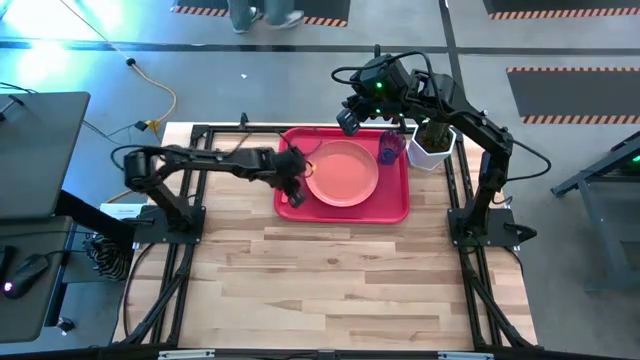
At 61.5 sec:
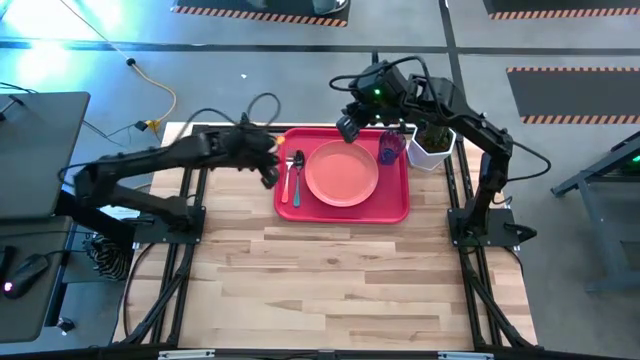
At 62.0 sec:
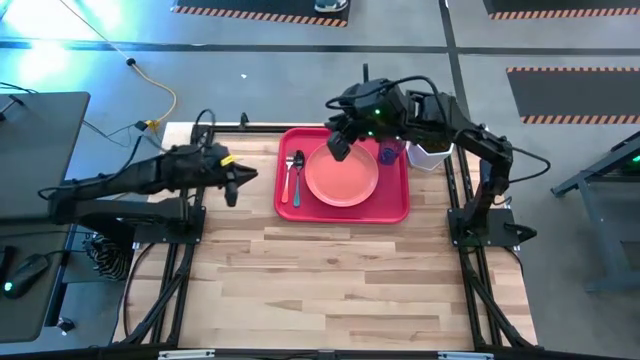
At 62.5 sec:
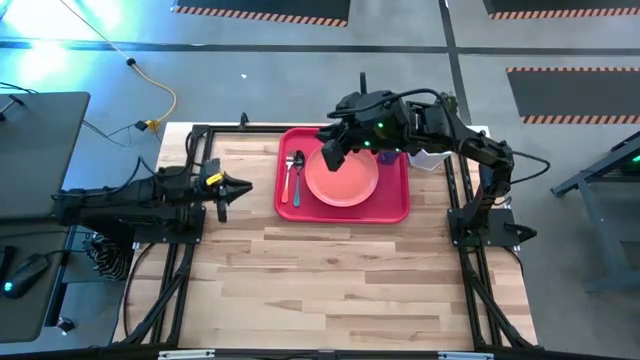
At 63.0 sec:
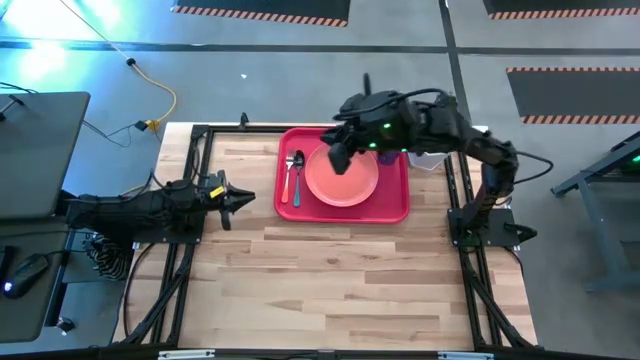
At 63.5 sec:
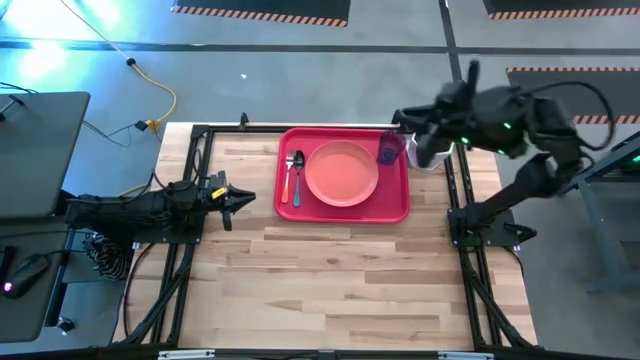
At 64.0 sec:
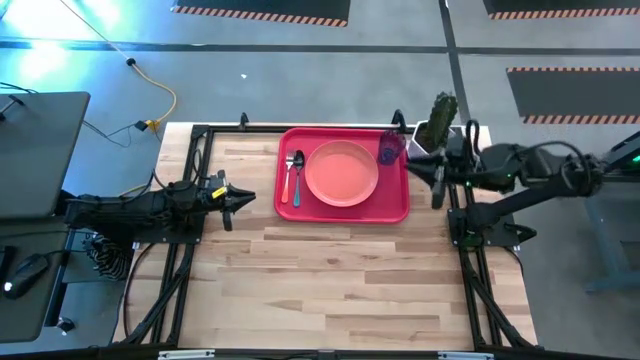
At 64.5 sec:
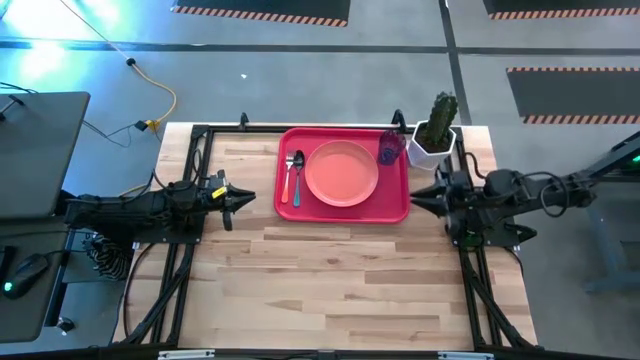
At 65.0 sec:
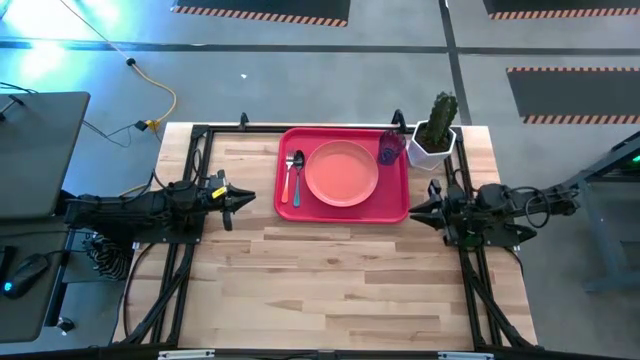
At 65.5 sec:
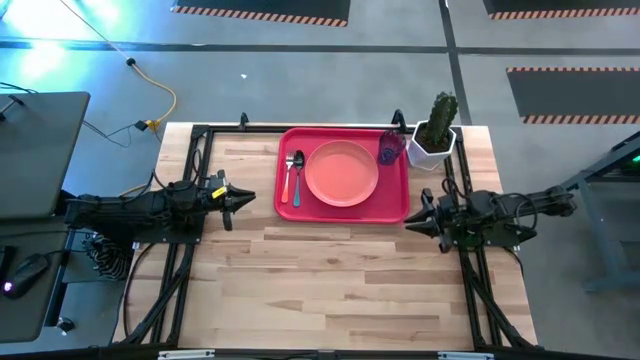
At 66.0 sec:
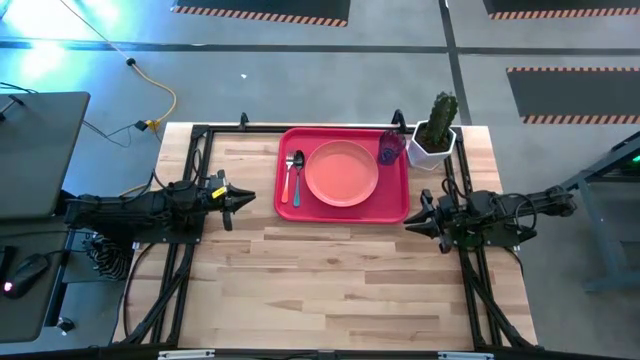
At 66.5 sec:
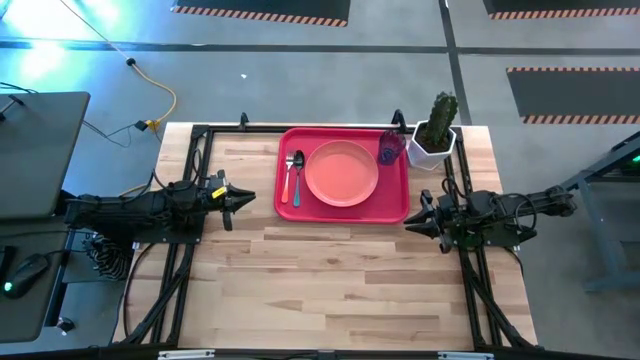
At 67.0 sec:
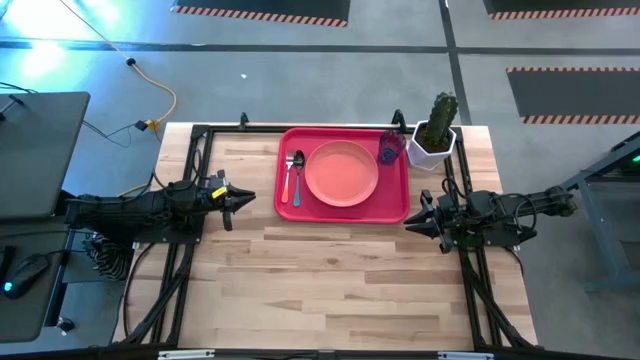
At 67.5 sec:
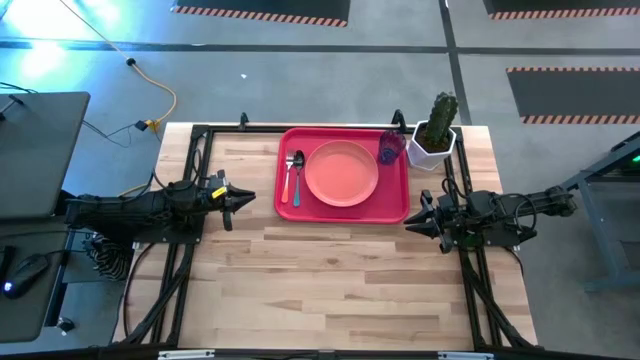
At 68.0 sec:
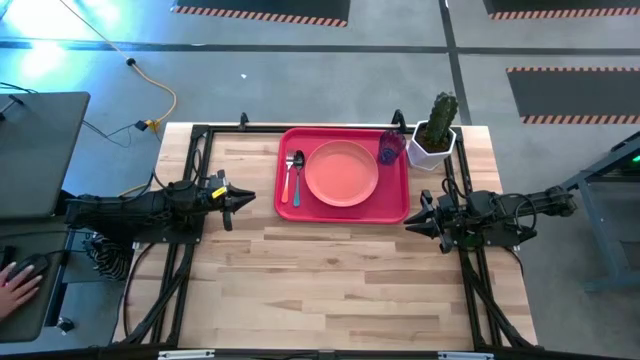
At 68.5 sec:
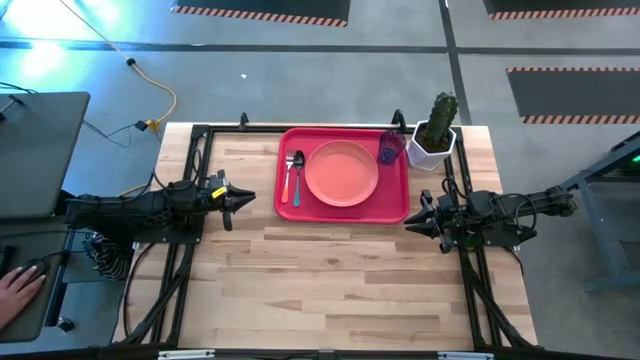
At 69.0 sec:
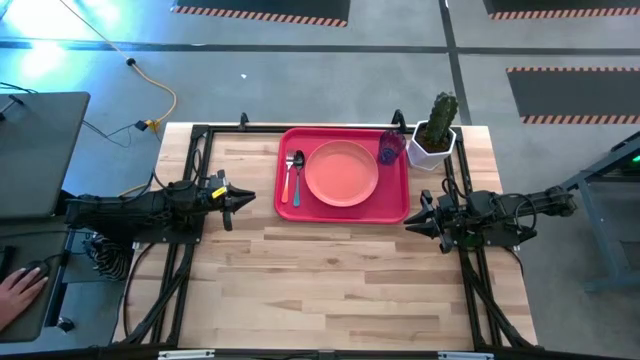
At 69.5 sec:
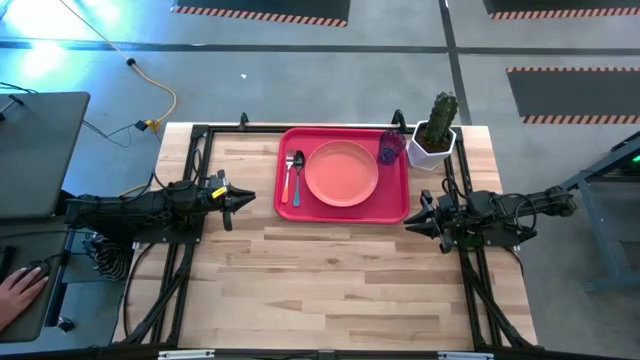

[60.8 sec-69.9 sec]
Task: Pick and place plate/cup/fork/spoon on tray
Return to Home Position

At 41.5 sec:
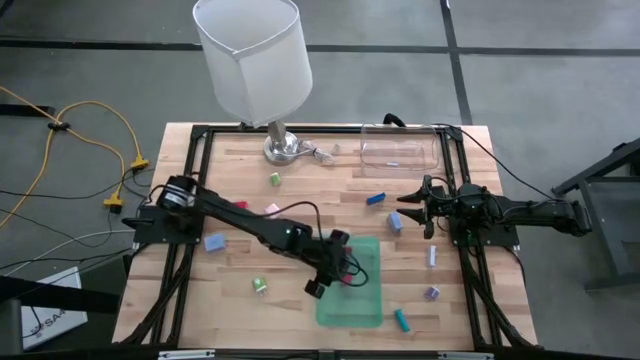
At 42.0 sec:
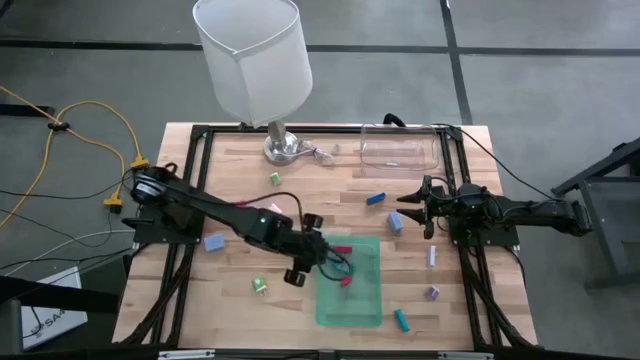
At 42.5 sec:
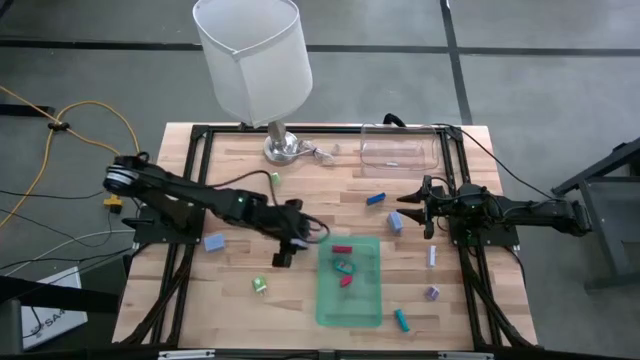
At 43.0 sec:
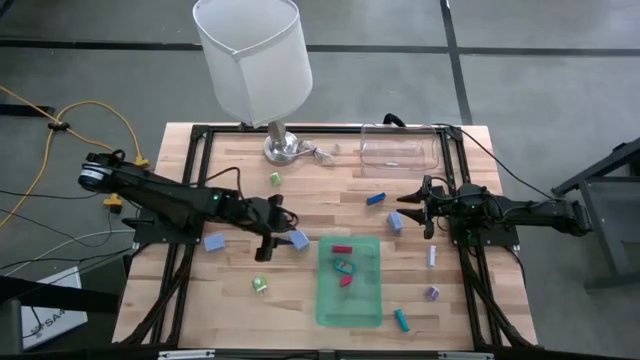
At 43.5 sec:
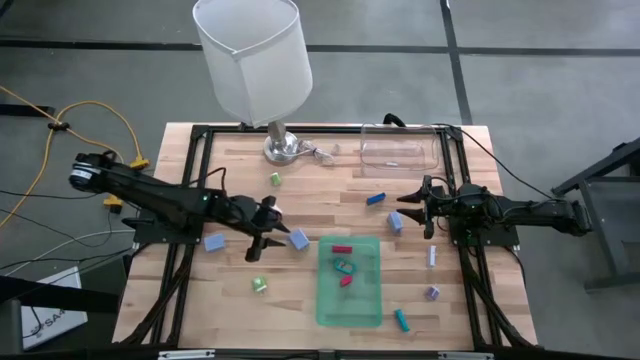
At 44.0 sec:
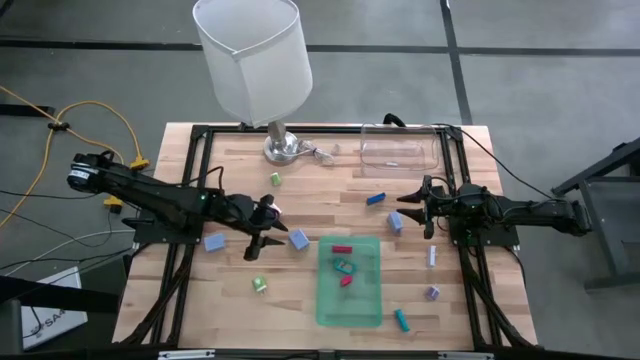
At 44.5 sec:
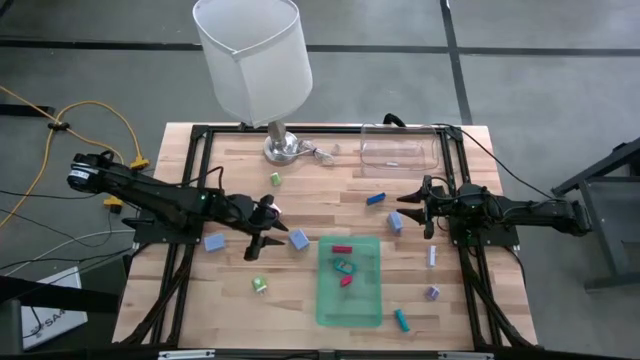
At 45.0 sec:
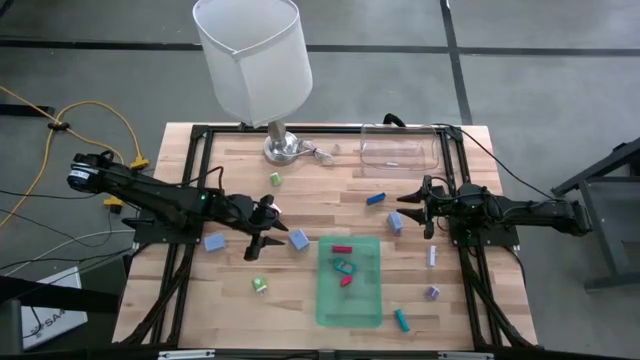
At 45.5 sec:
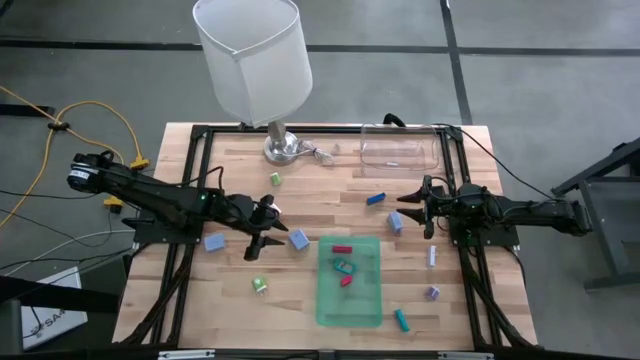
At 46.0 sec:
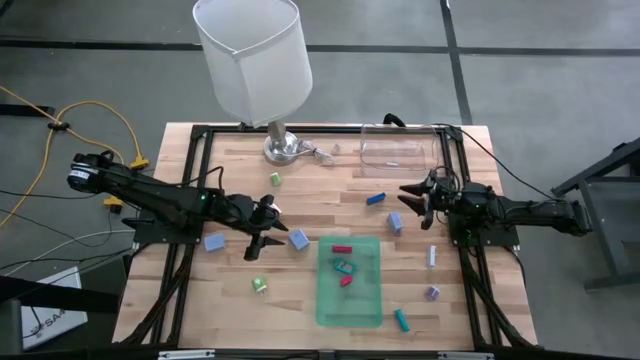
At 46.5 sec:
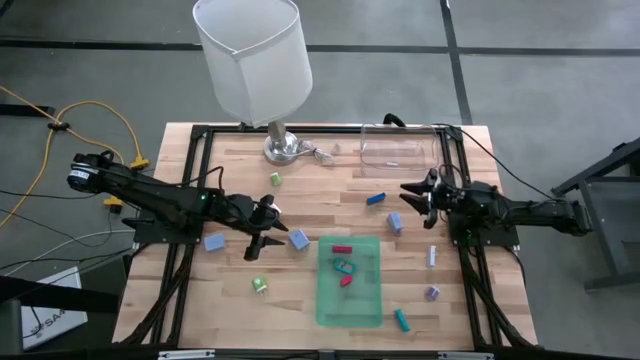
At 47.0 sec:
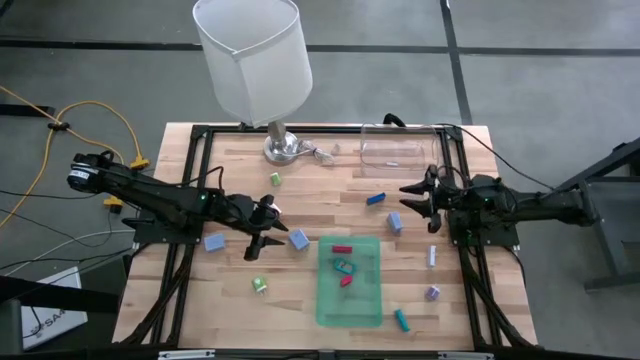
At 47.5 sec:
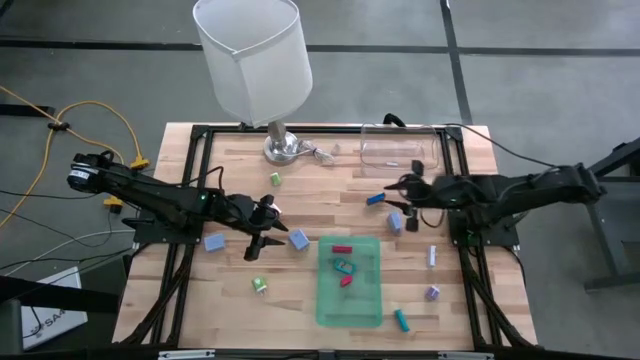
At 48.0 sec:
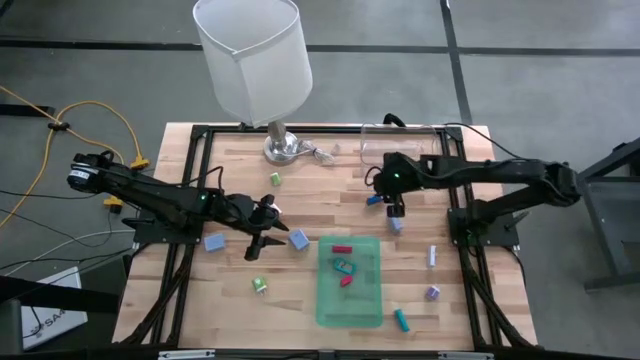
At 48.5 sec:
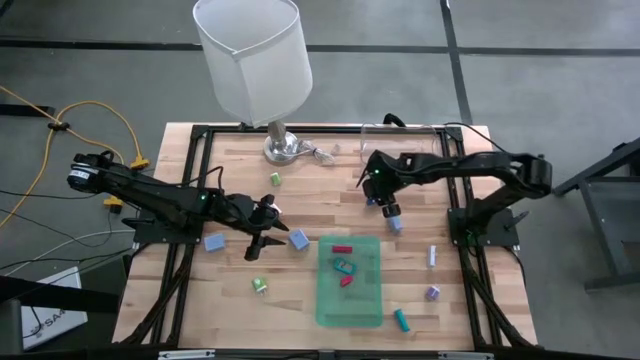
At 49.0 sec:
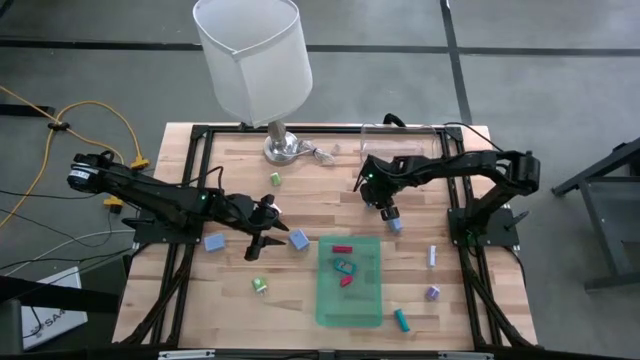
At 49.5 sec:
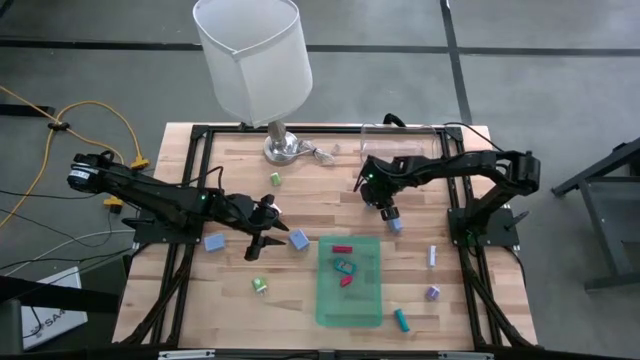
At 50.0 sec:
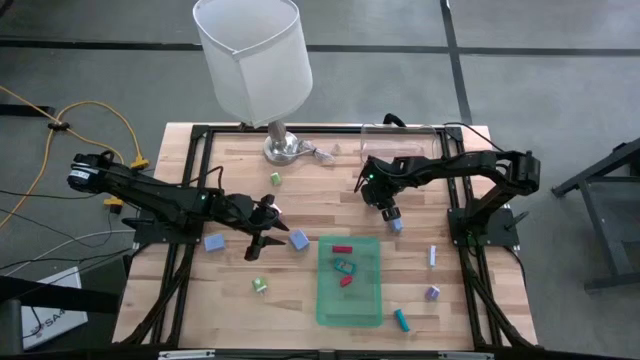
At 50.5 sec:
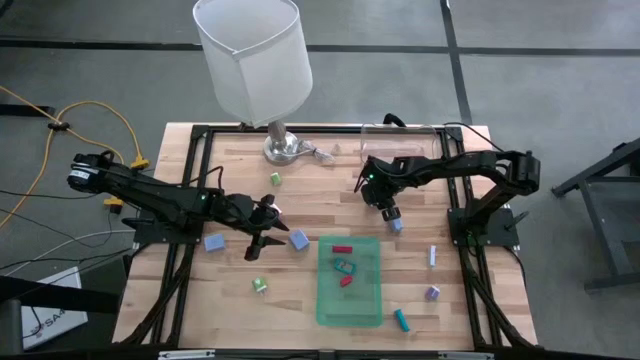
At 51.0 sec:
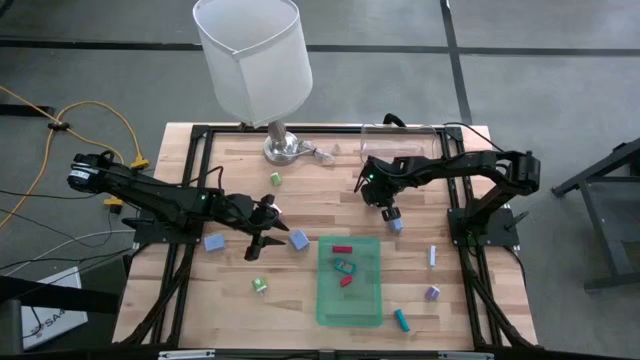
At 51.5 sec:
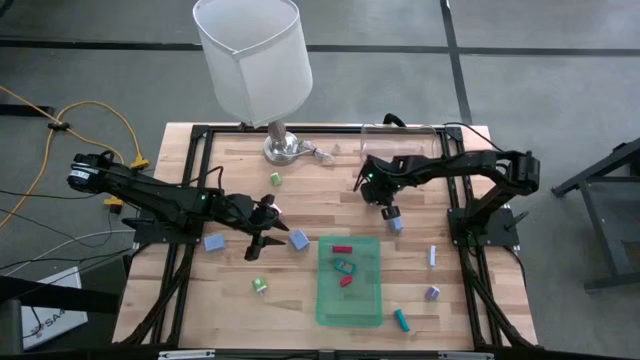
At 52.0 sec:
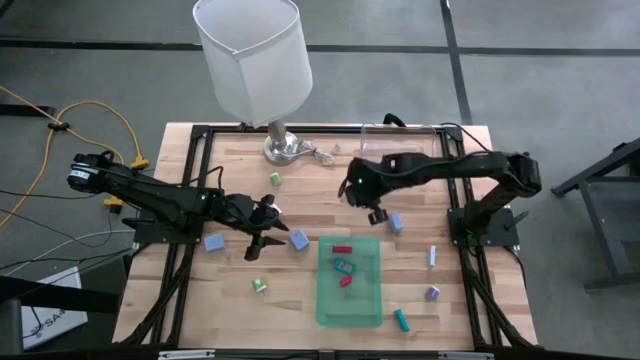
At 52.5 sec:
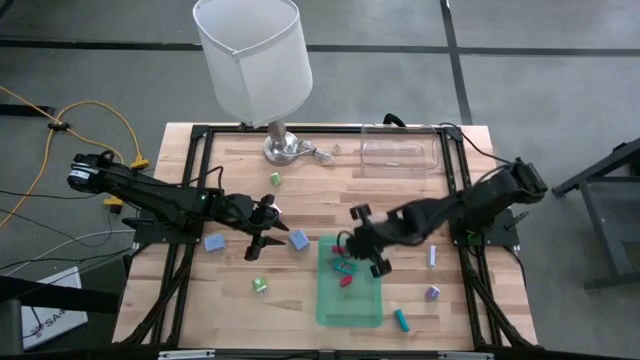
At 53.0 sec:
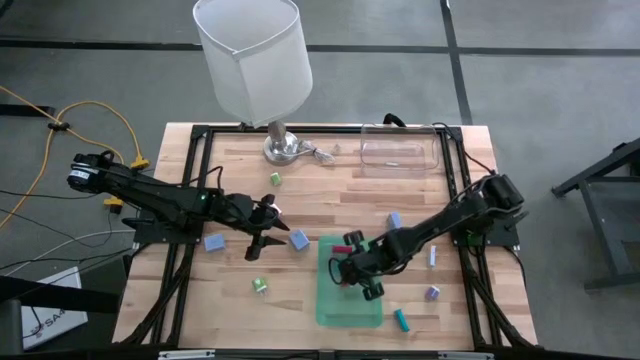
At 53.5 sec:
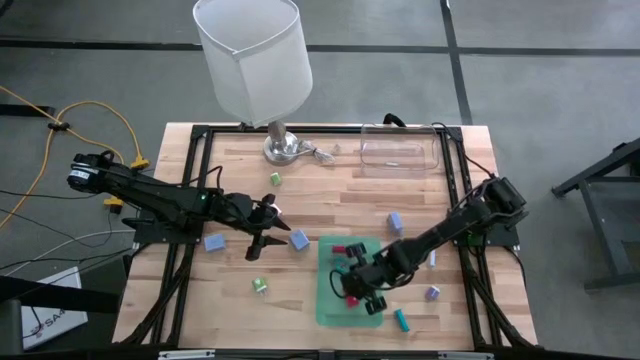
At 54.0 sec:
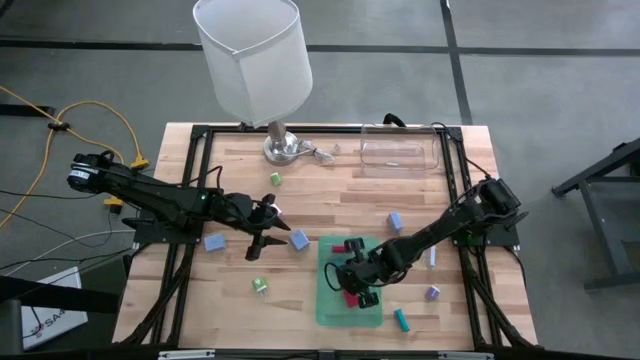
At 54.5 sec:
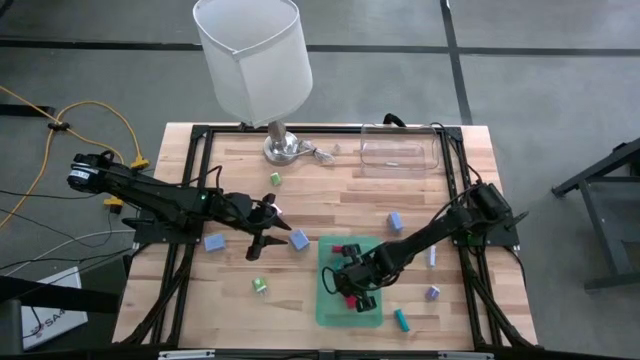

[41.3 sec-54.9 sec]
Task: Pick & Place Office items
Put the blue digital clock into the green bin
